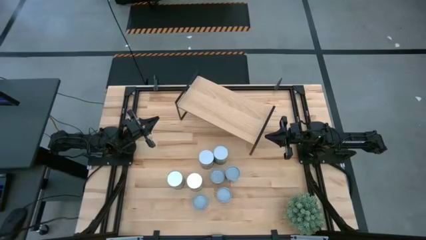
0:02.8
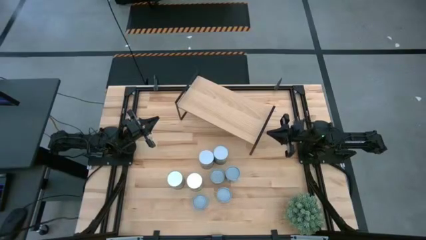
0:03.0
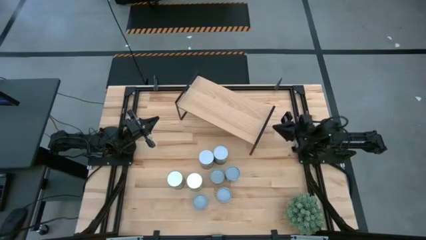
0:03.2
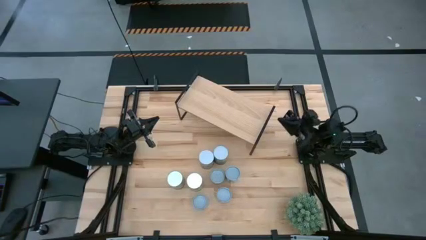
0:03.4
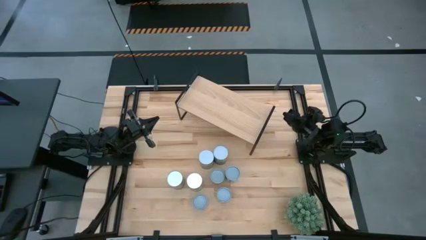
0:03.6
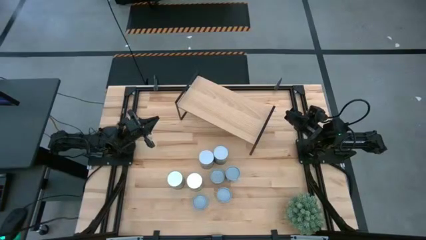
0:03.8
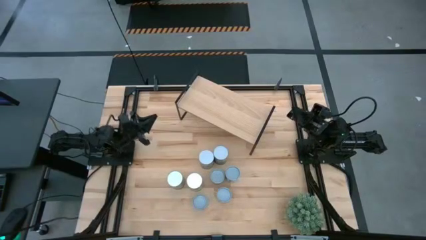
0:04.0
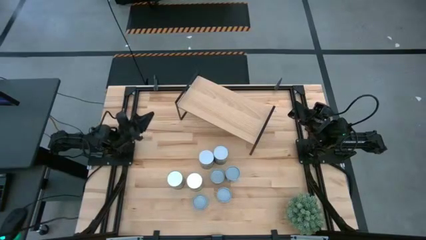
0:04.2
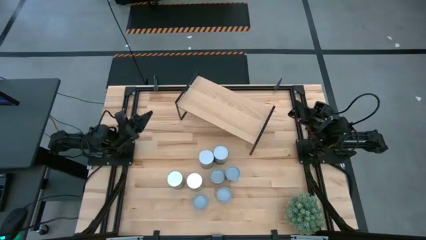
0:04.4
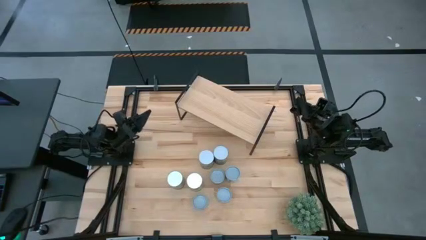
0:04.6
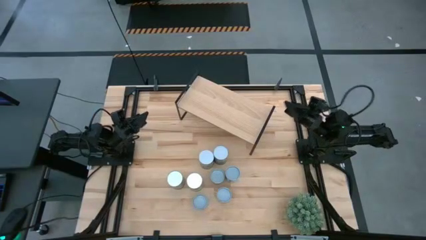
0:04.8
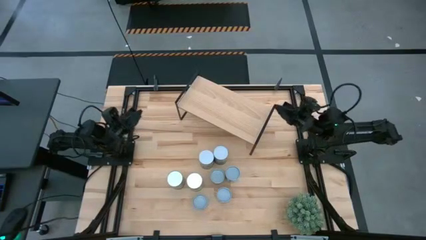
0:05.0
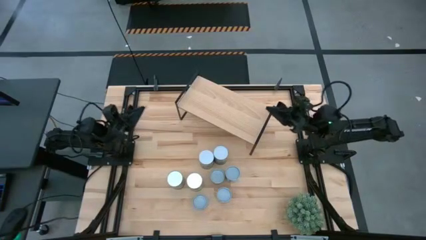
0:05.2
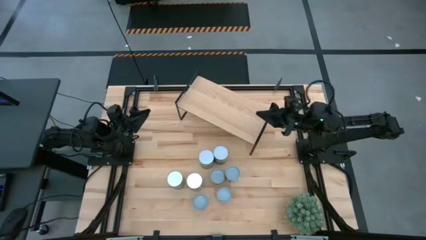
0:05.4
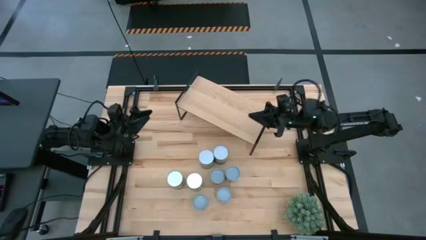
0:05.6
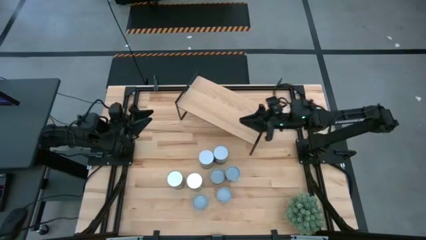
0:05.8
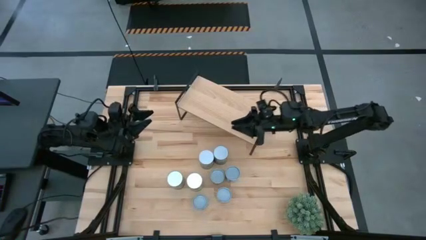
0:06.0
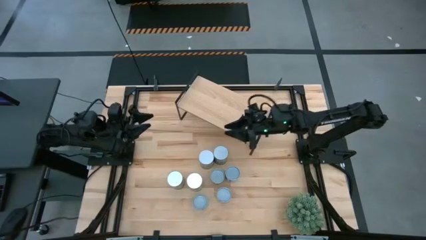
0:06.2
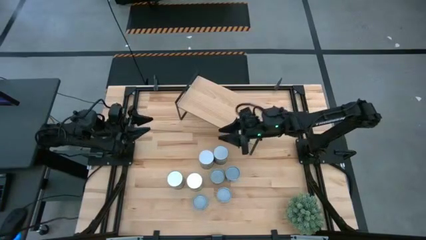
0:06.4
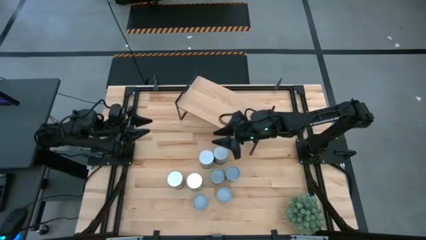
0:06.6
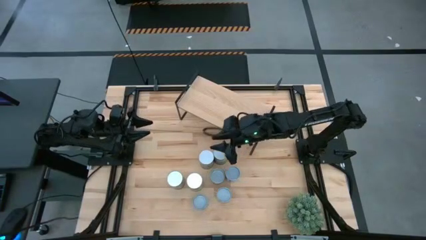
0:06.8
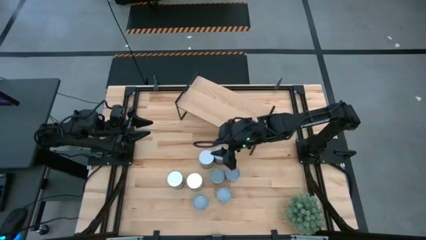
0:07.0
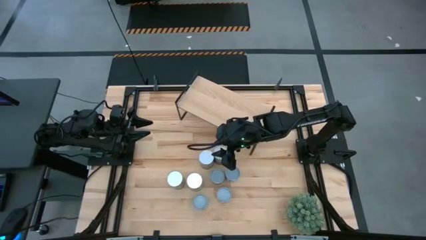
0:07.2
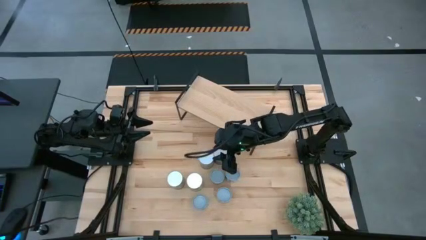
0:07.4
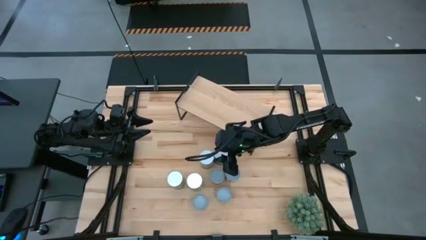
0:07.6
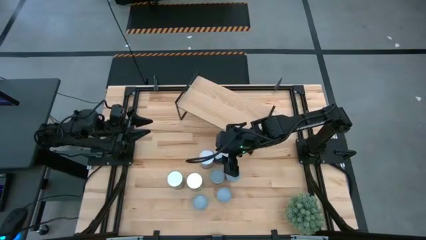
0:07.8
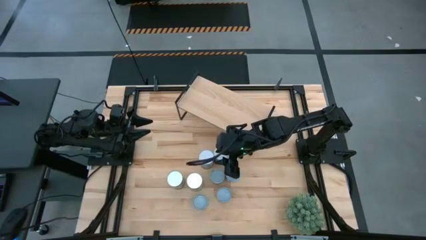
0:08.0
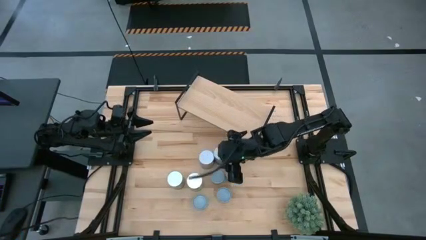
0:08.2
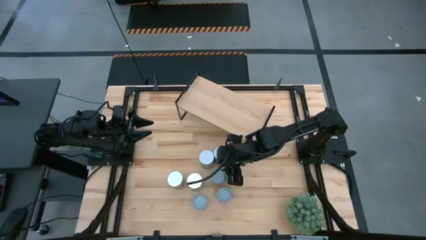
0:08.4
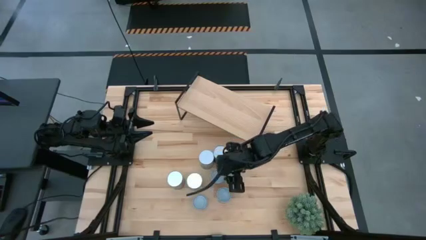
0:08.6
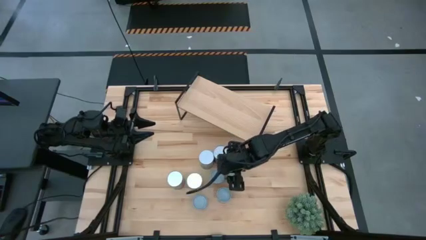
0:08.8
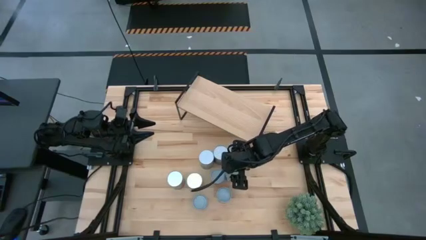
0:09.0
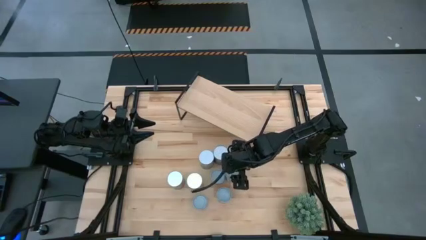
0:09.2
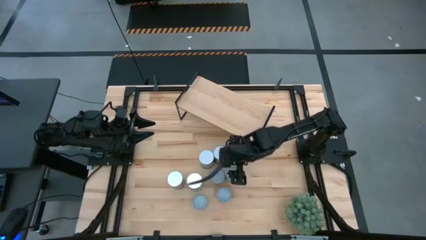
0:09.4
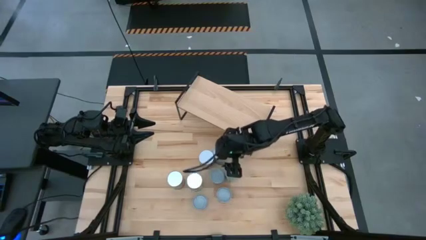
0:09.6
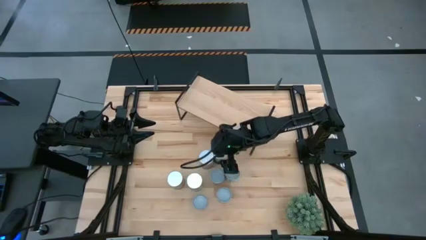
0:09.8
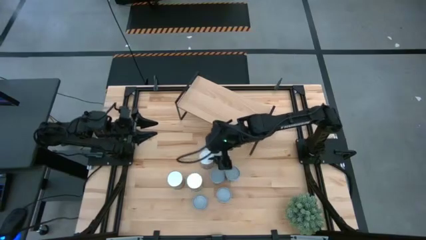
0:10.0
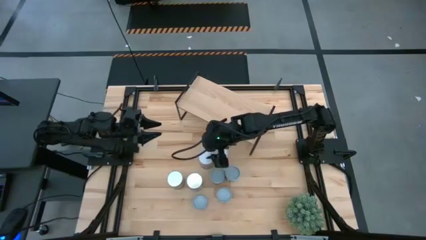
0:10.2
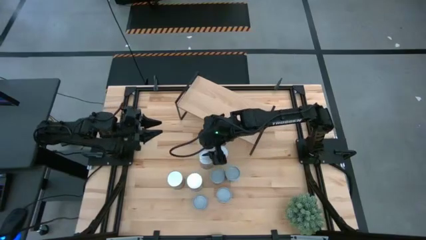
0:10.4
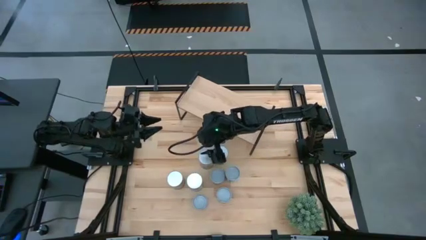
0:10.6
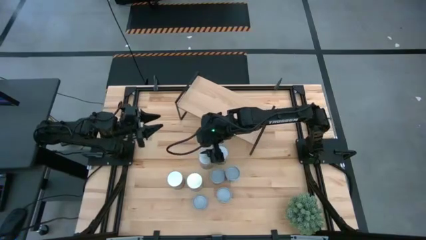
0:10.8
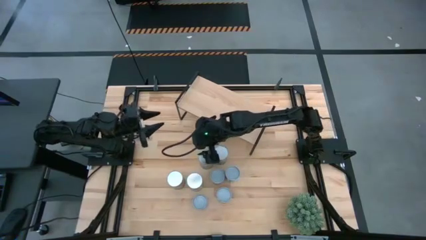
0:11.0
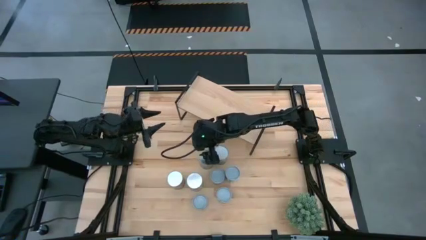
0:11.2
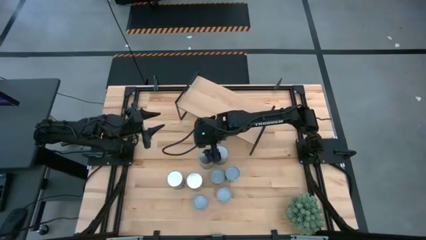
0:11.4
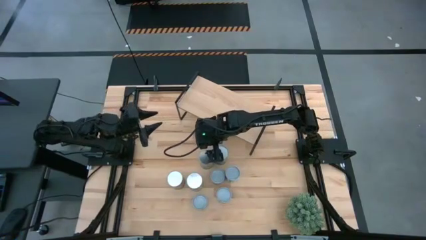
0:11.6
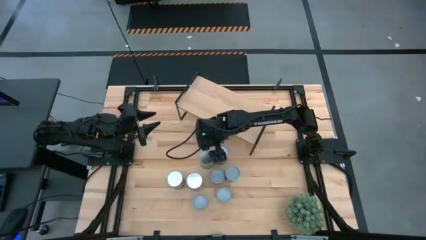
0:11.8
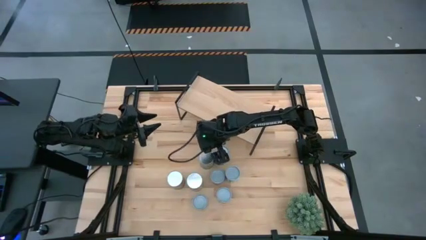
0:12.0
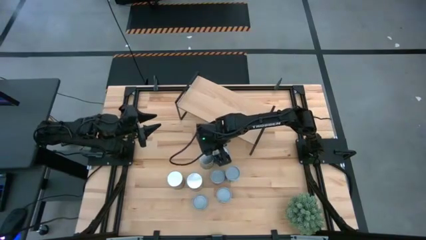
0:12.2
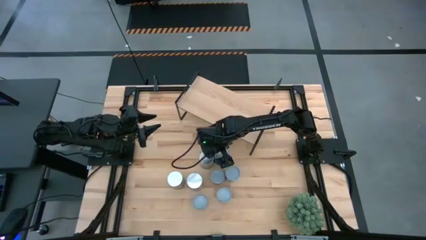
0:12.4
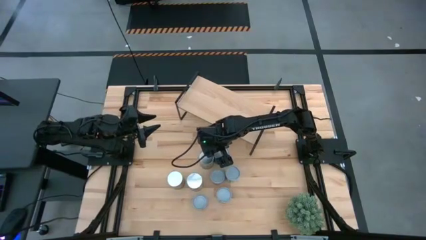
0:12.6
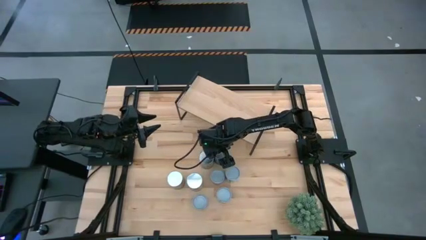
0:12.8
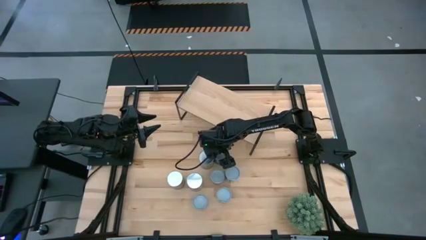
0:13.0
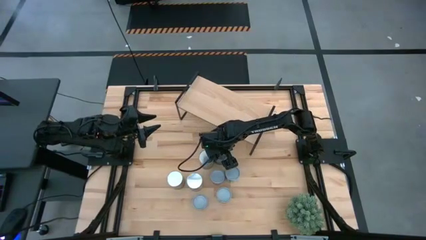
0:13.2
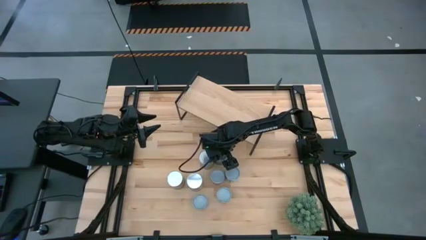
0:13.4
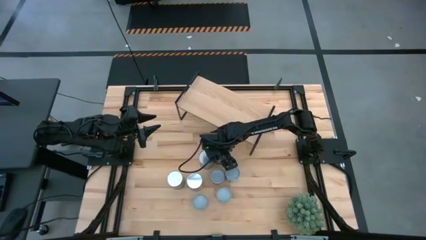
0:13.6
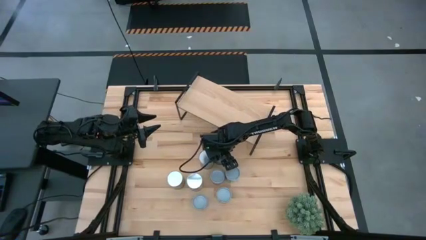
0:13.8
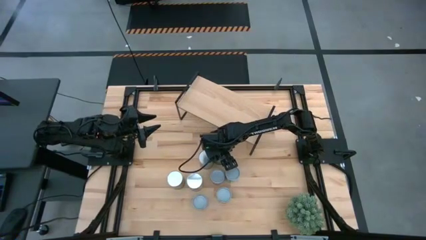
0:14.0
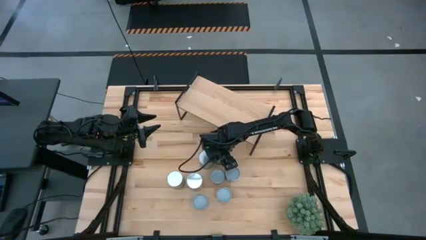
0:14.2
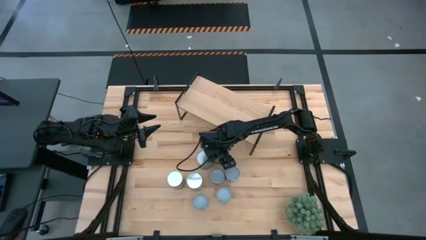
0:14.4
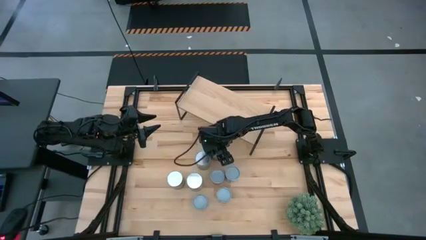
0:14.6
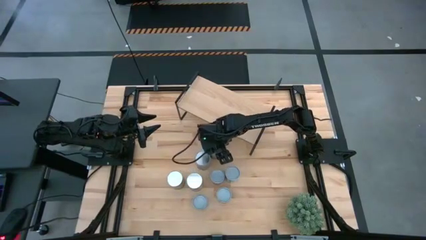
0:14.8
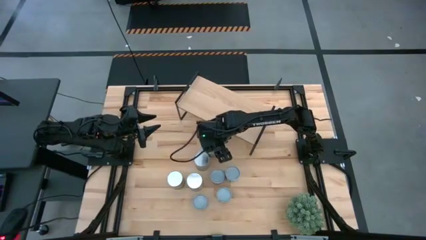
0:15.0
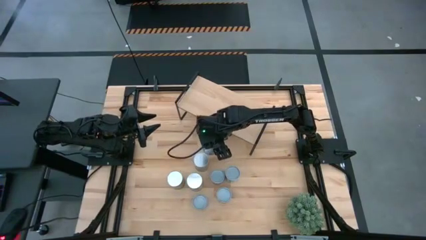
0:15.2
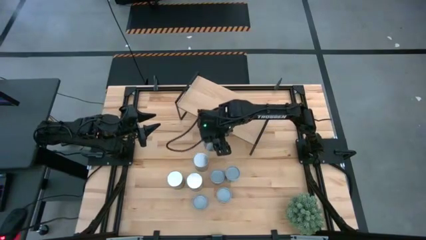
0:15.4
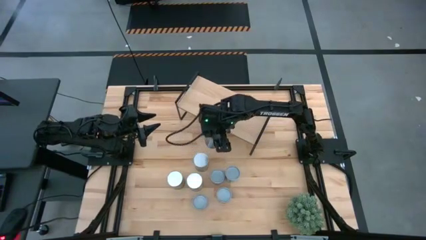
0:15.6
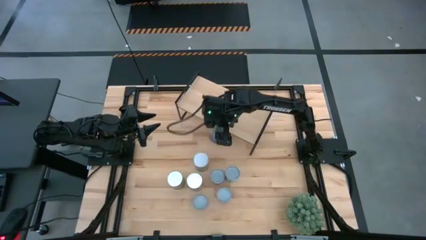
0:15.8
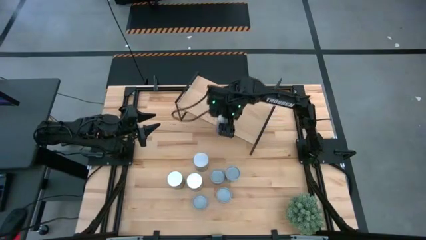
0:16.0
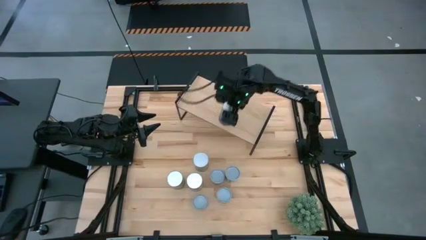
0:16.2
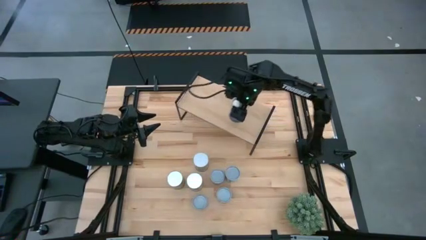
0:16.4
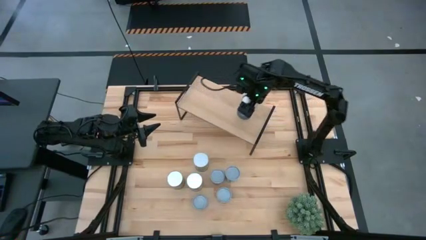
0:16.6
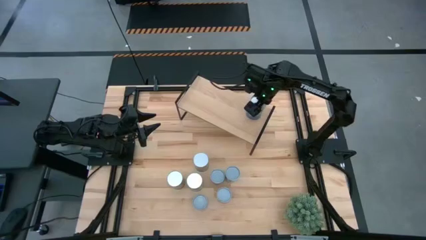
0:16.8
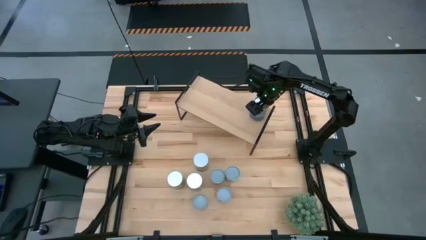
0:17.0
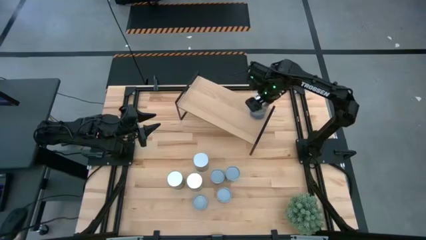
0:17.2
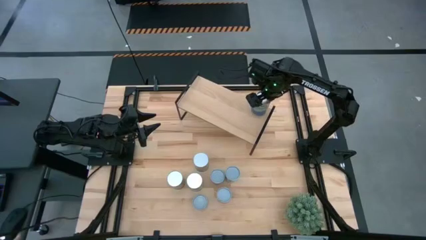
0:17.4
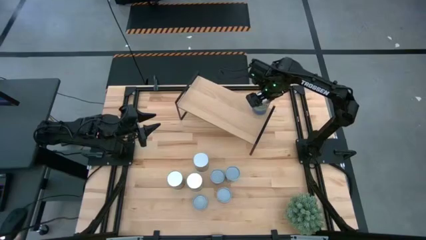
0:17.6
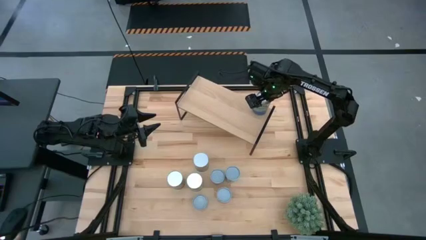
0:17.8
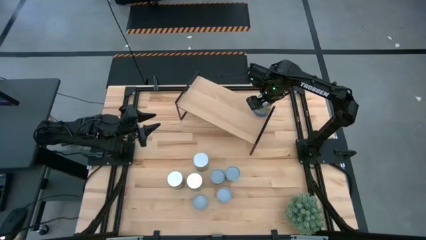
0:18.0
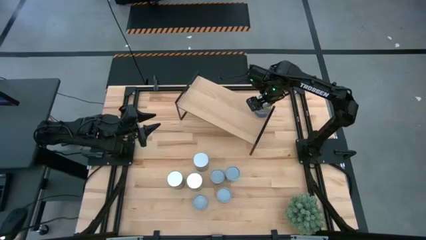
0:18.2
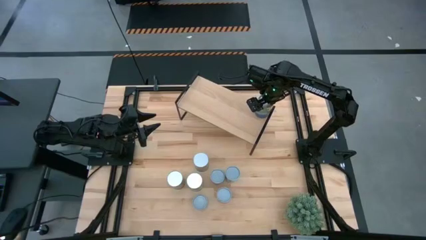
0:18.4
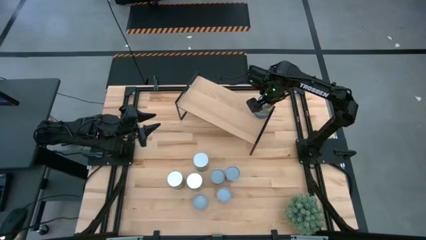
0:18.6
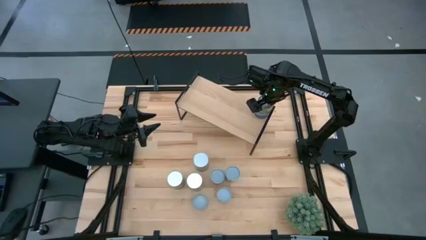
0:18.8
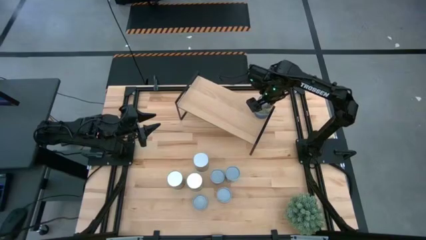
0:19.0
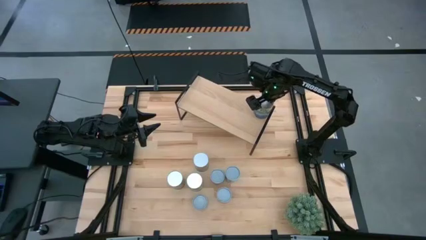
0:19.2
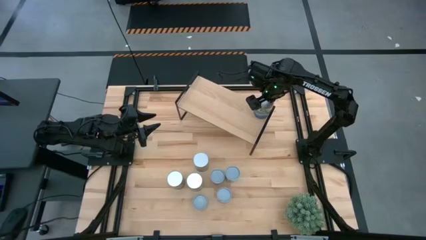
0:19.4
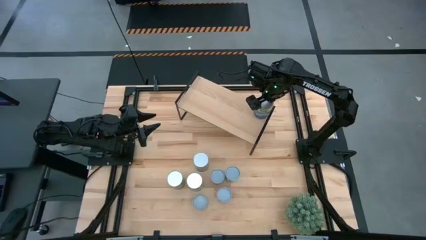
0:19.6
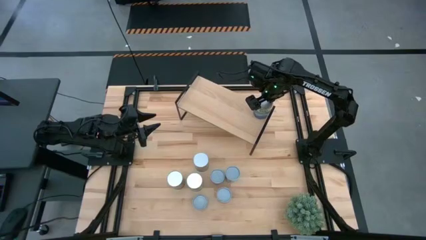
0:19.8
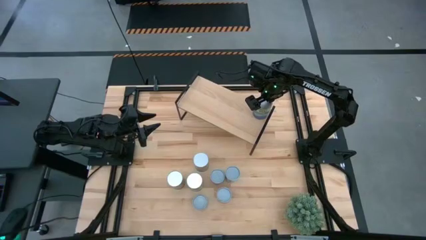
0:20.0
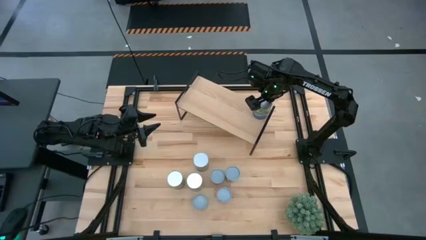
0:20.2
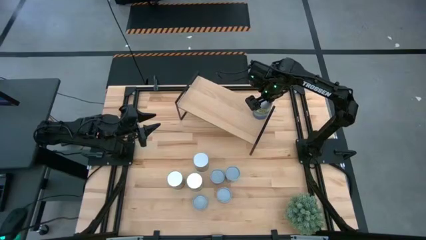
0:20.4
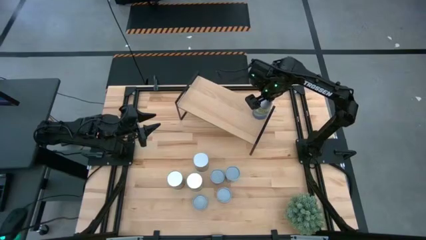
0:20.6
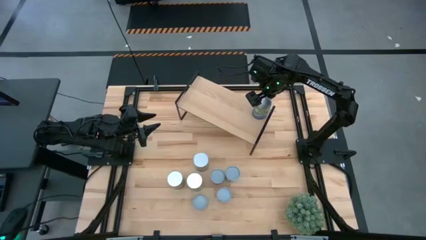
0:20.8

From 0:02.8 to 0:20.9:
Task: Pick and place cans onto a shelf
Put the top canned peas on the shelf
